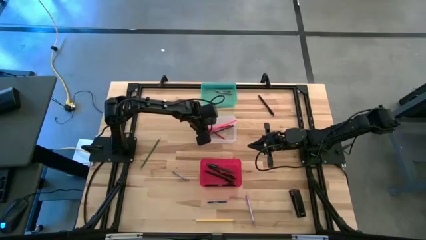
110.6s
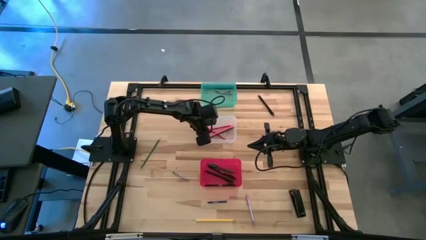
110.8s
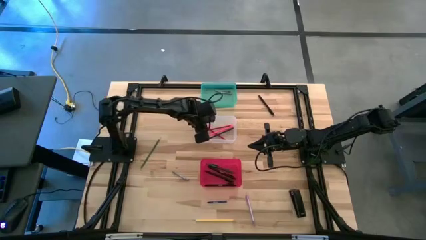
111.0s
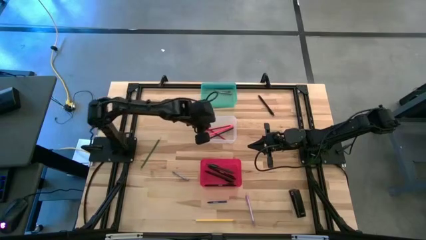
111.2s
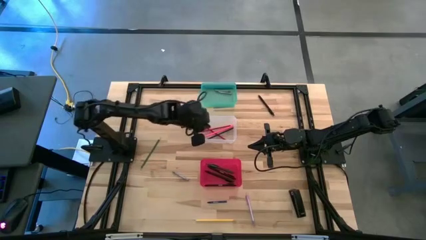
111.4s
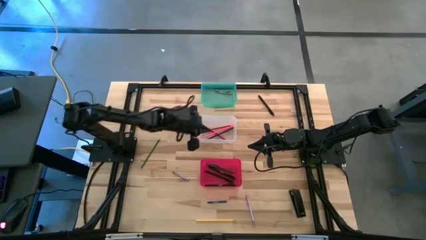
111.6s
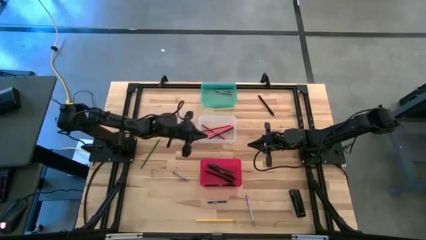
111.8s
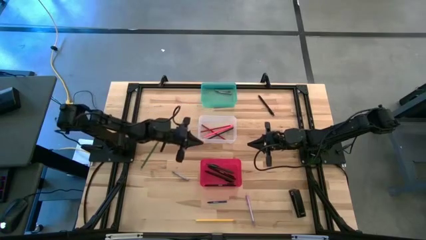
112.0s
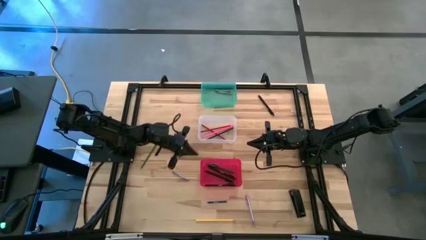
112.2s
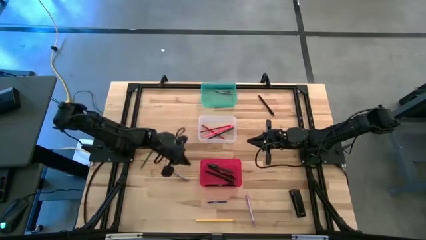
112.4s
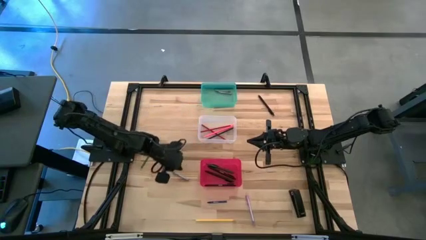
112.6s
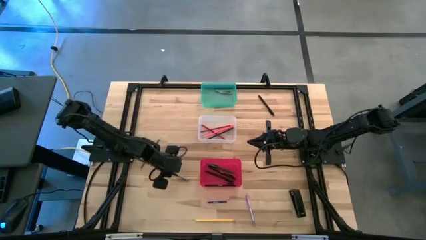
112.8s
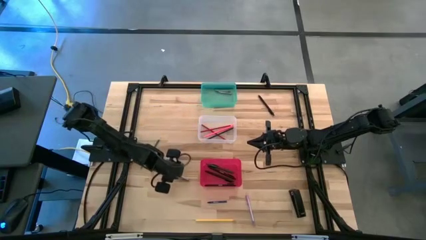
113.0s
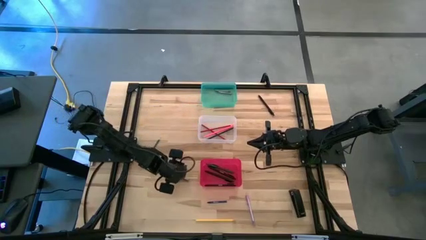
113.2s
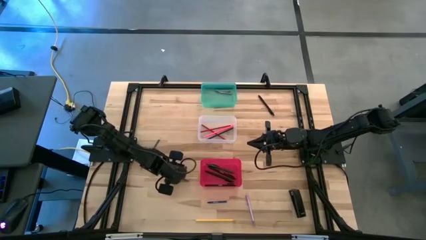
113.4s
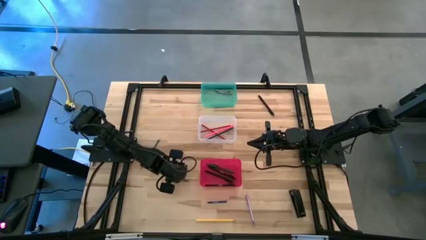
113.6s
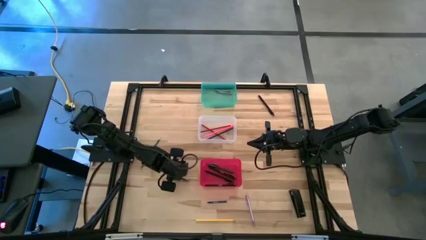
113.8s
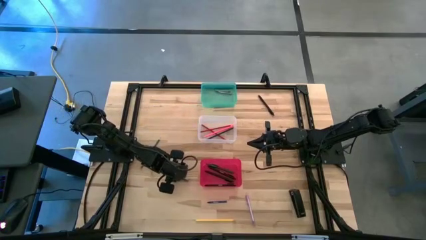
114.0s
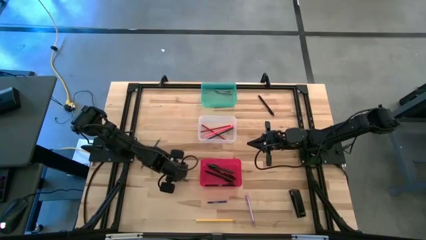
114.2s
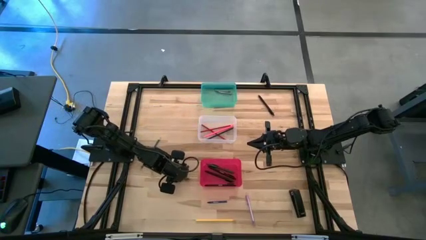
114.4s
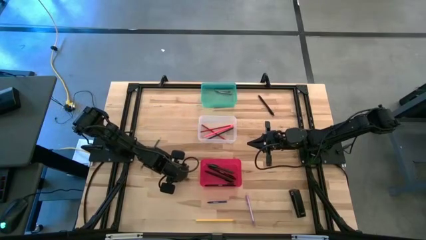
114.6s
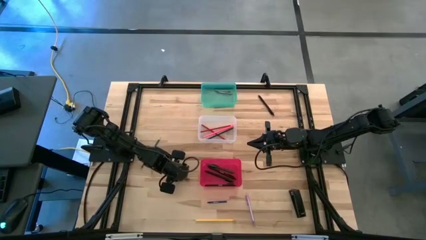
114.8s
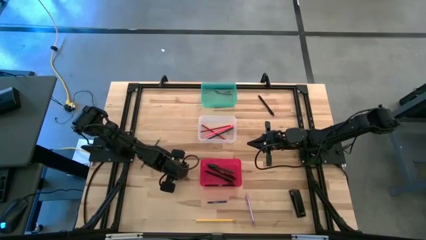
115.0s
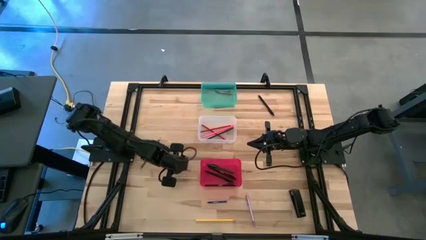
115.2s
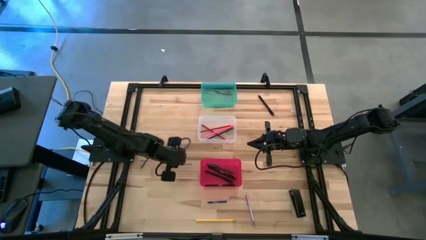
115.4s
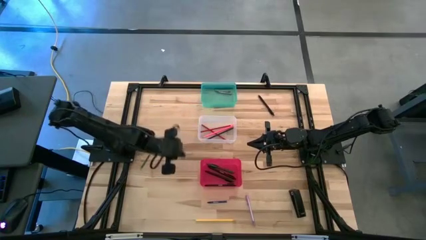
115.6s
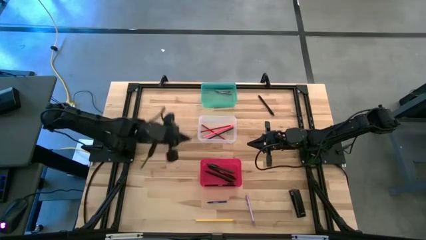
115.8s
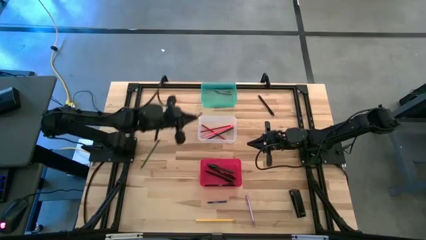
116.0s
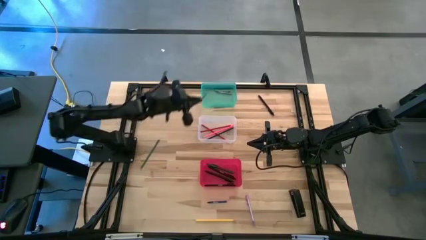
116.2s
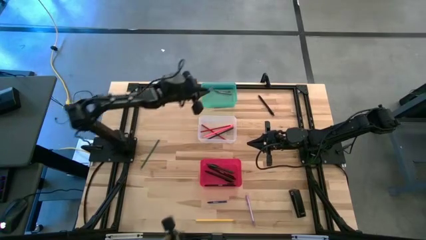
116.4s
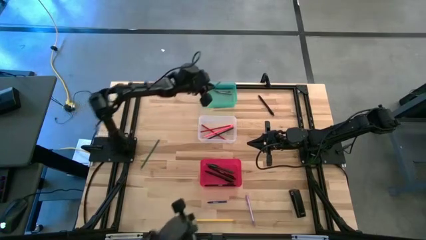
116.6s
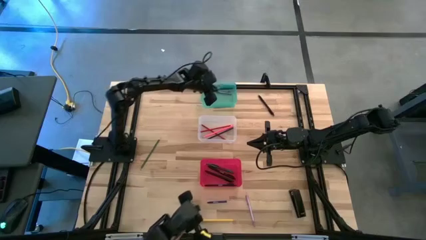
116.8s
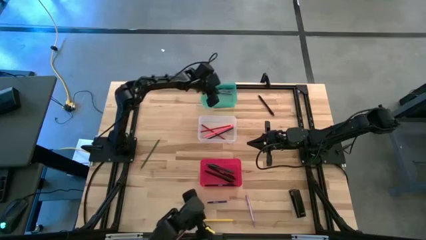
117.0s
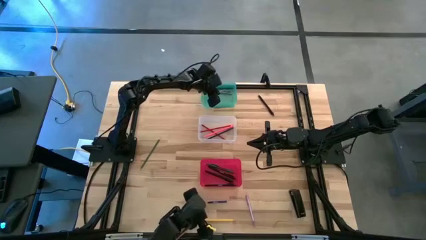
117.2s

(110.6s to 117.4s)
Task: Sort crayons/erasers/pens/pencils in bins
Put the gray crayon into the green bin

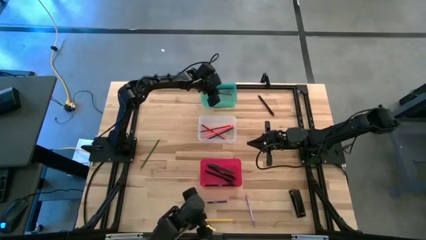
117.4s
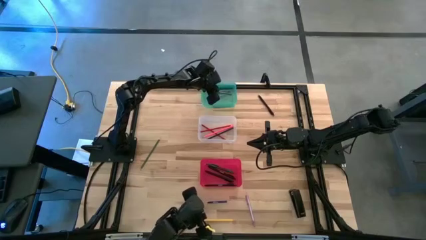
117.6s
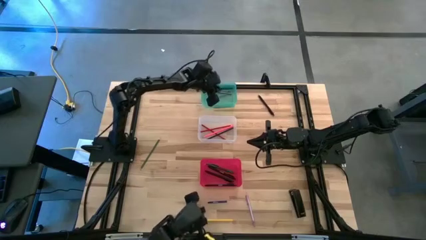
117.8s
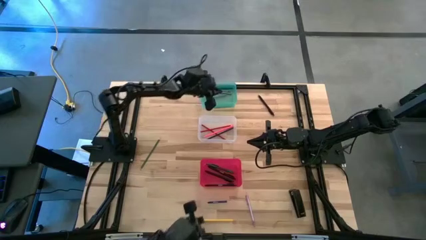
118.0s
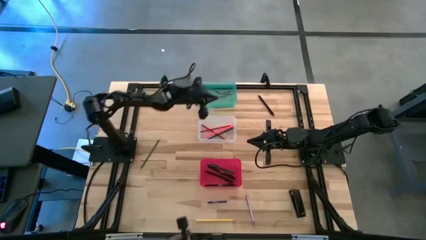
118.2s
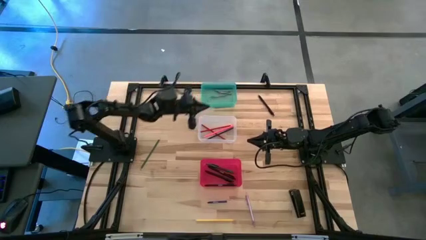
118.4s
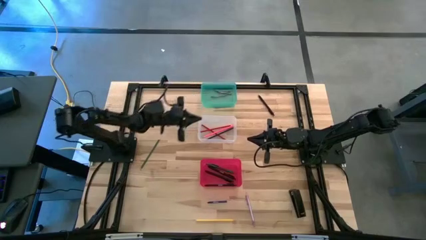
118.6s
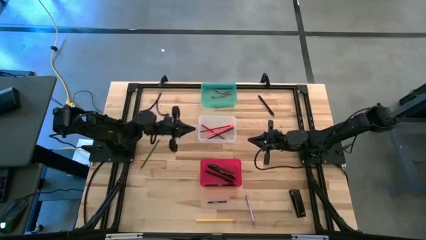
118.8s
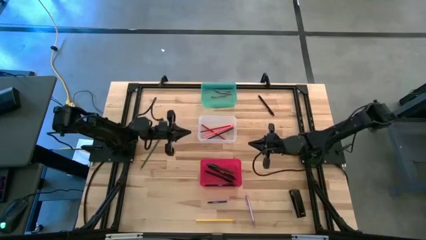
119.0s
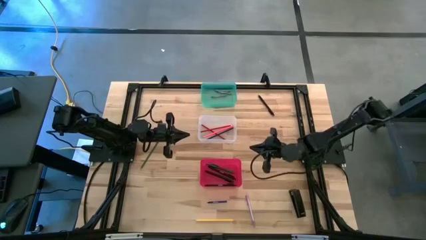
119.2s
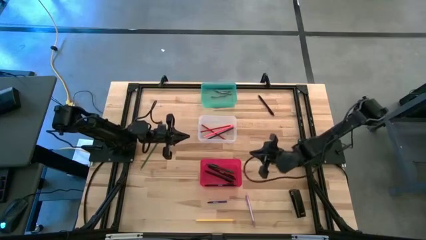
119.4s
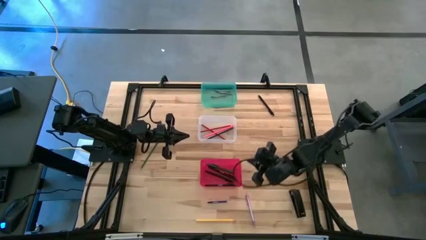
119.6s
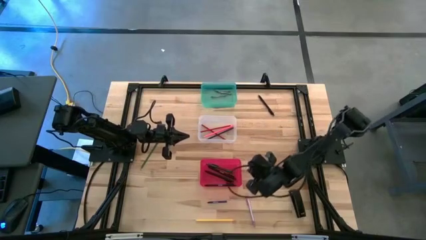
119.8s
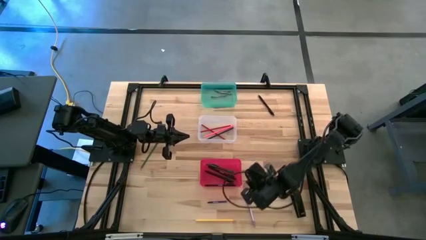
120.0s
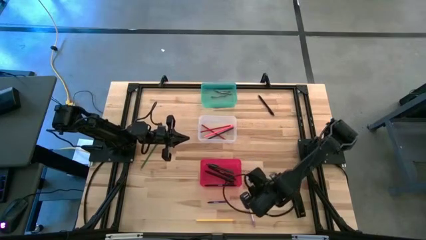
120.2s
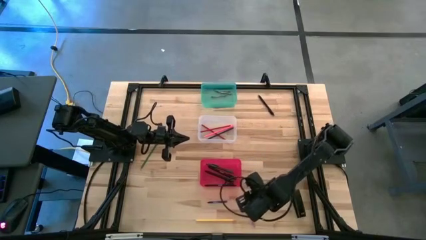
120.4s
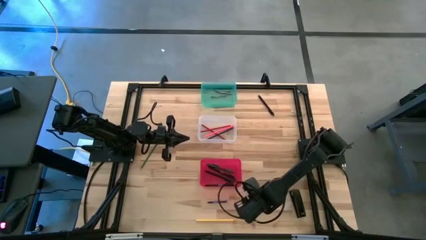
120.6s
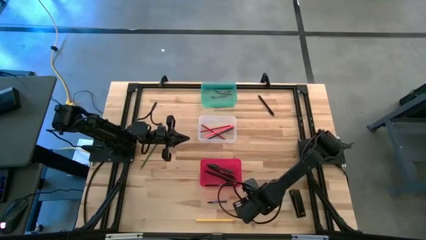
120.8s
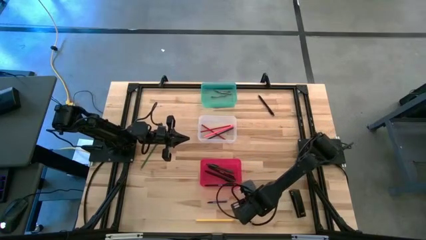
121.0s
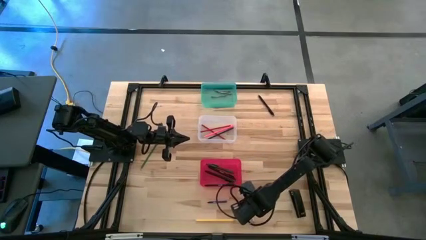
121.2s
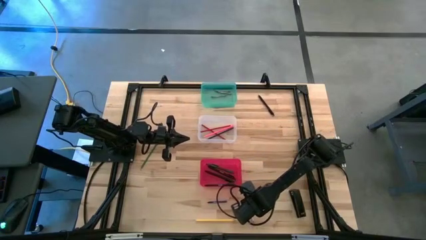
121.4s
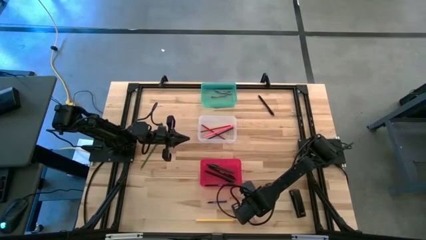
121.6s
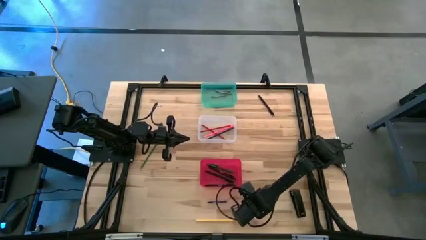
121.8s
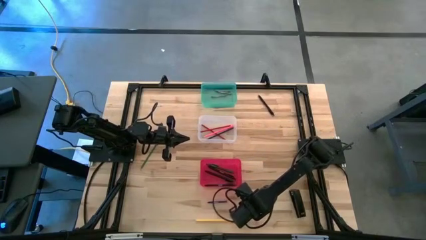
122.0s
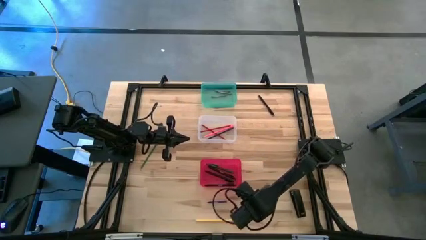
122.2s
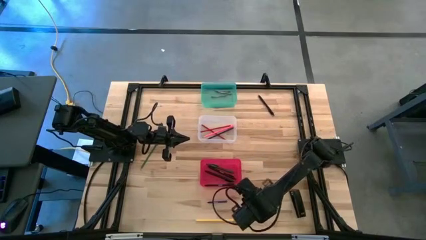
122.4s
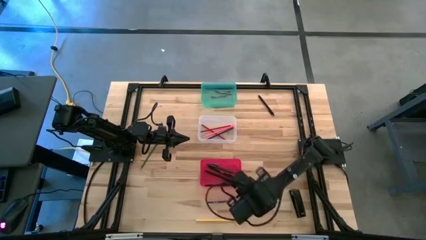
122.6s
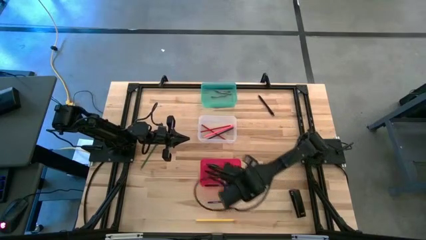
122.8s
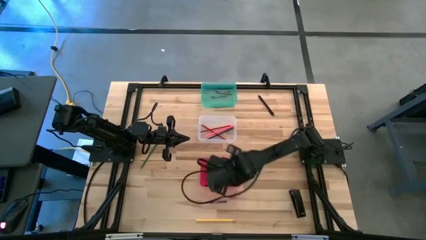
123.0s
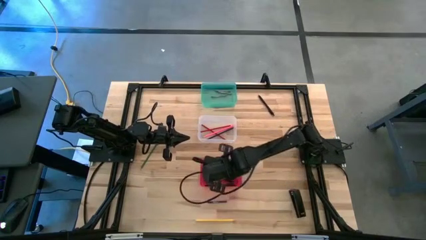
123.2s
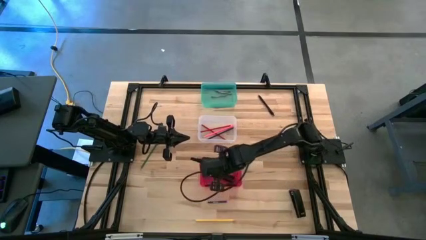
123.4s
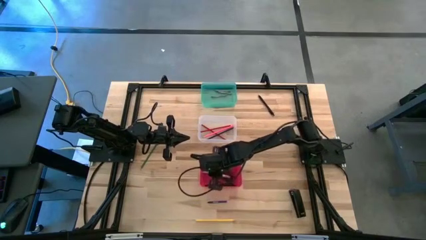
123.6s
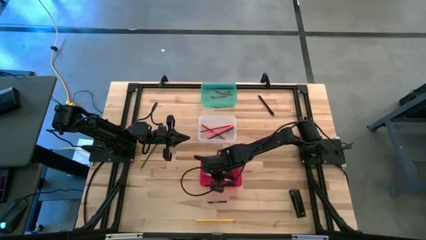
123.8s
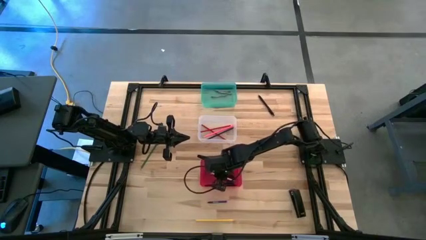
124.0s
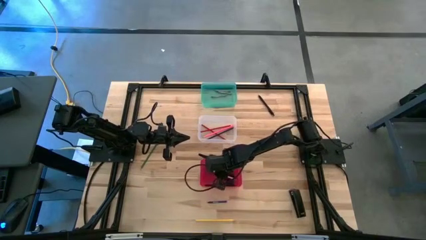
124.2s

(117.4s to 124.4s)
Put the purple pen into the red bin

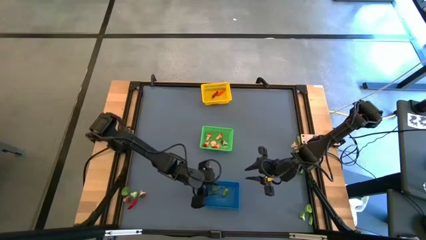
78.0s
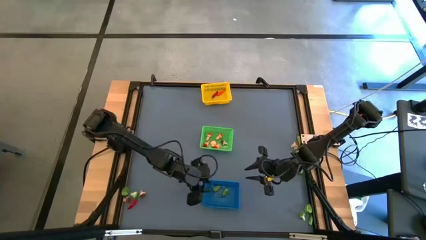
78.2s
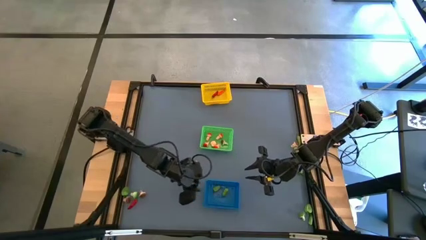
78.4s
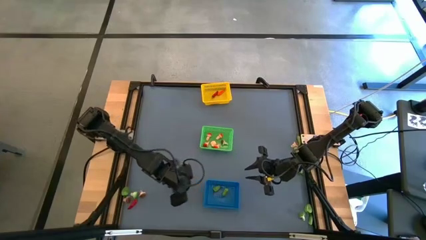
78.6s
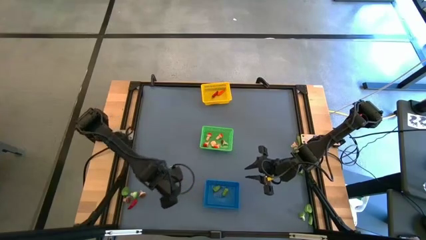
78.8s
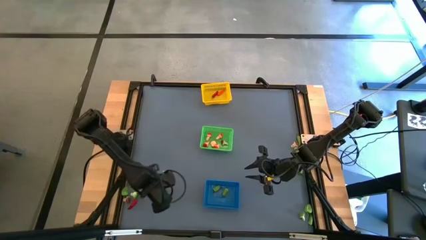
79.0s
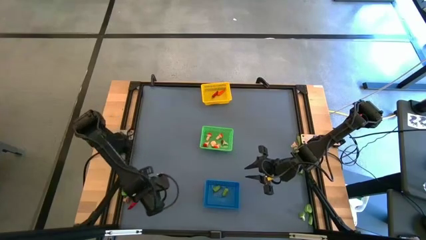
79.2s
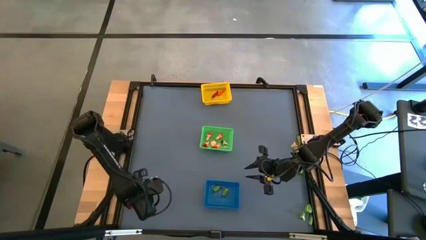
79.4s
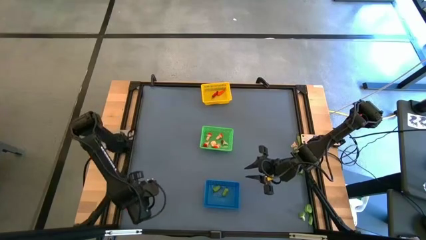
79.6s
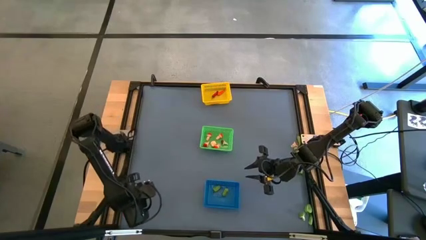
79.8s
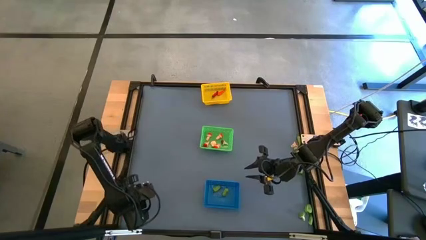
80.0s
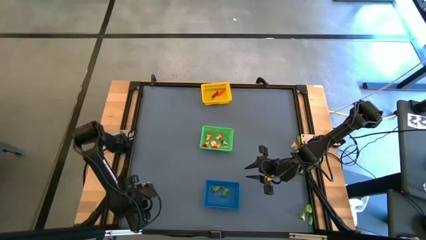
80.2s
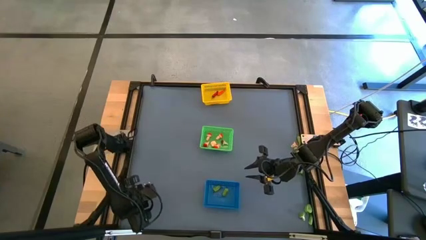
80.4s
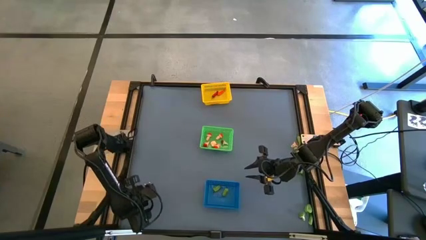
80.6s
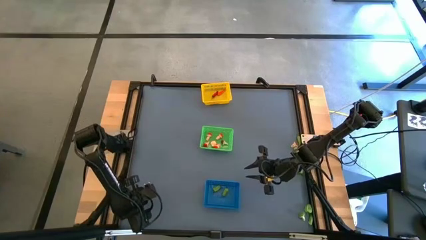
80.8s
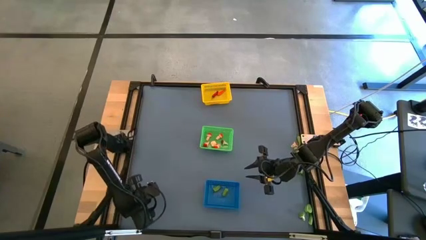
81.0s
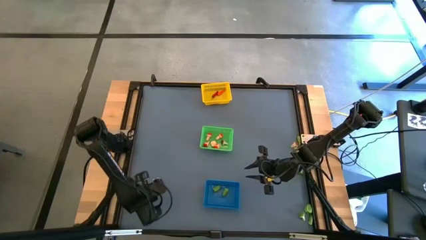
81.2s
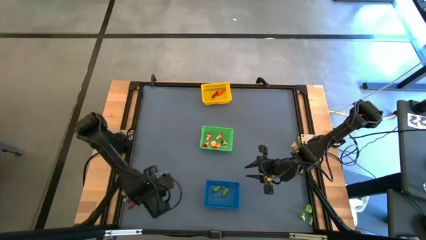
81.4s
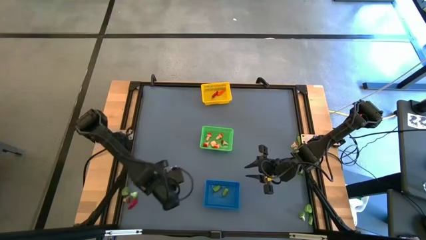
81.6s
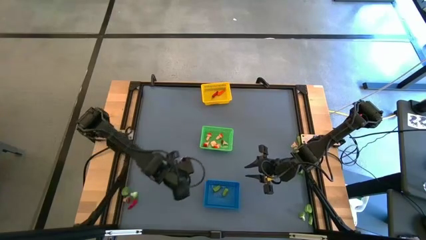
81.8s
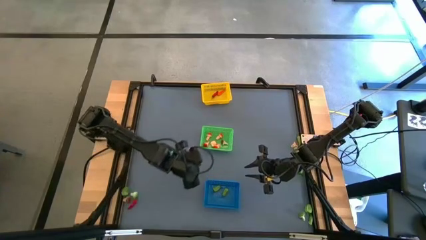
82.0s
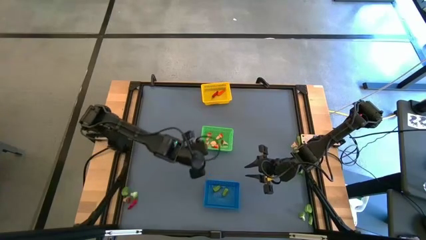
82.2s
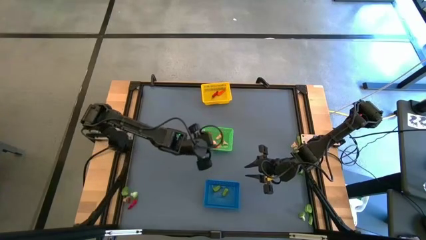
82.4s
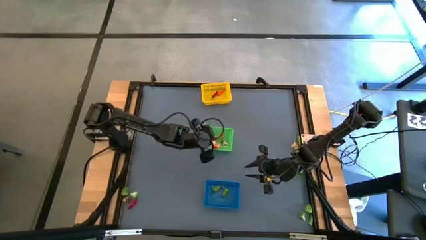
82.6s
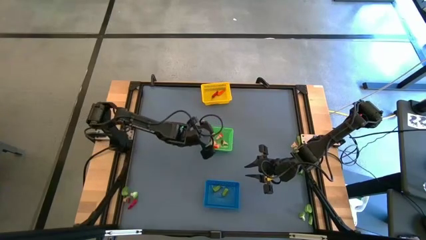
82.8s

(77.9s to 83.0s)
Task: Sort produce into baskets
Put the brown mushroom into the green bin
